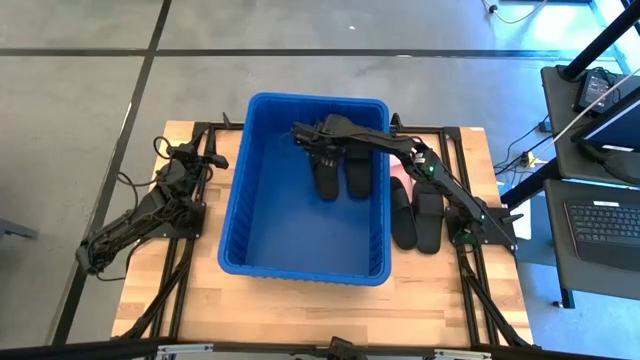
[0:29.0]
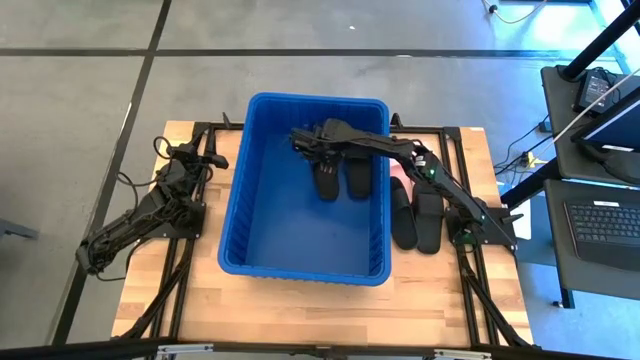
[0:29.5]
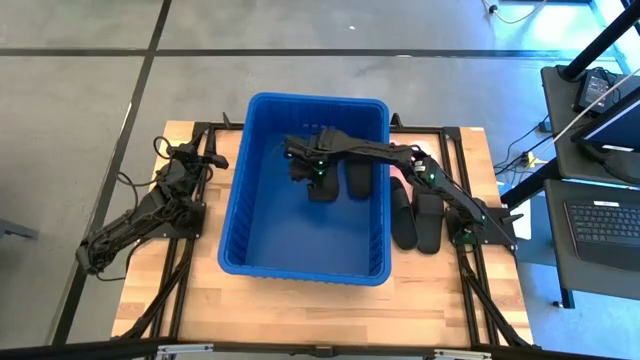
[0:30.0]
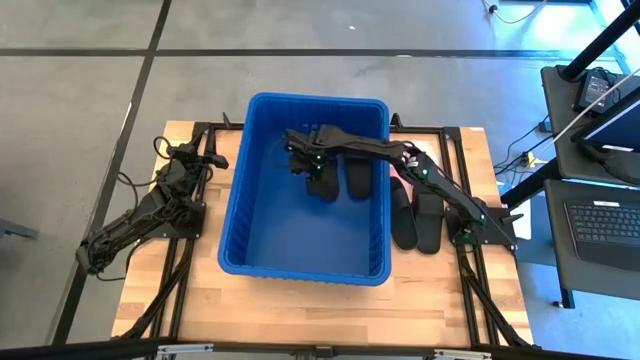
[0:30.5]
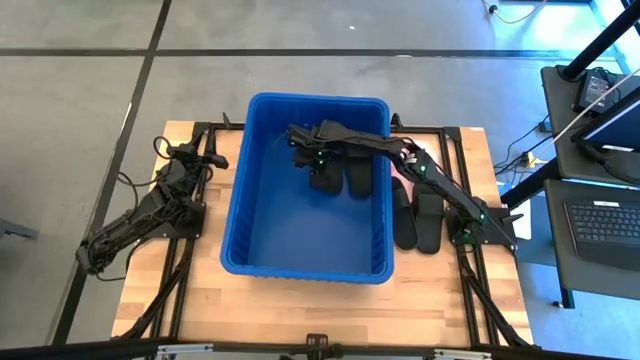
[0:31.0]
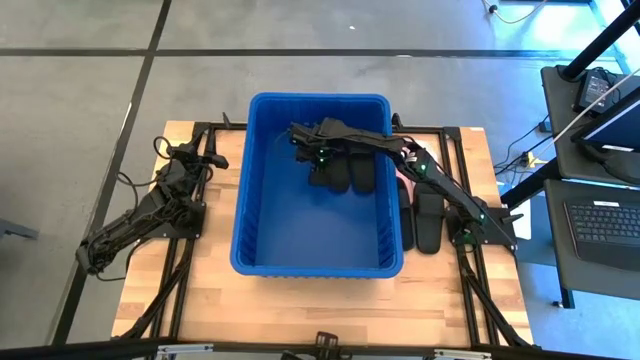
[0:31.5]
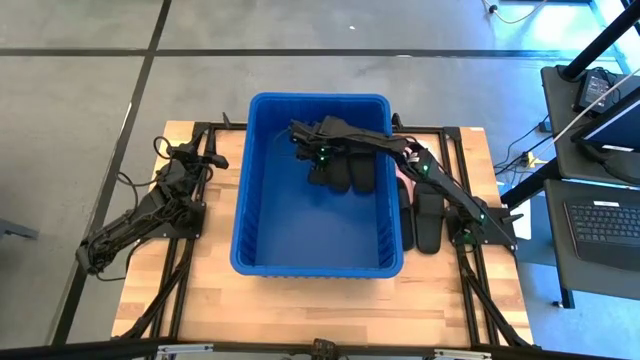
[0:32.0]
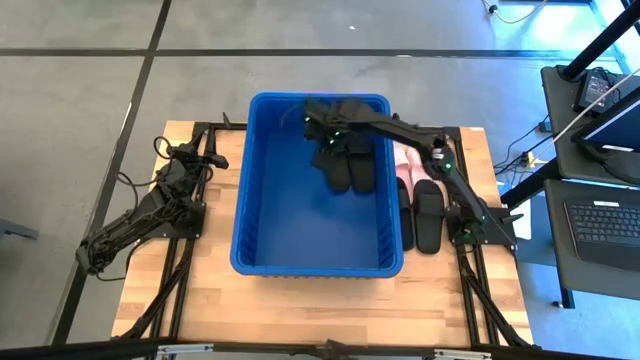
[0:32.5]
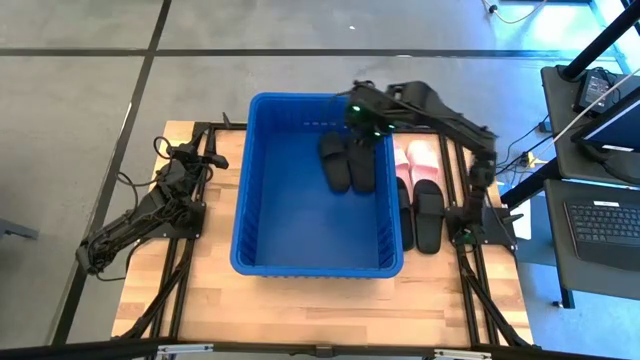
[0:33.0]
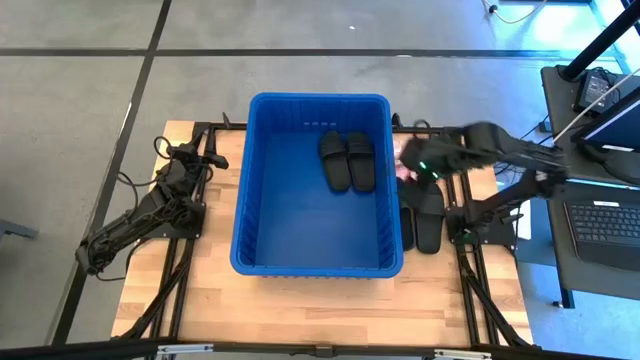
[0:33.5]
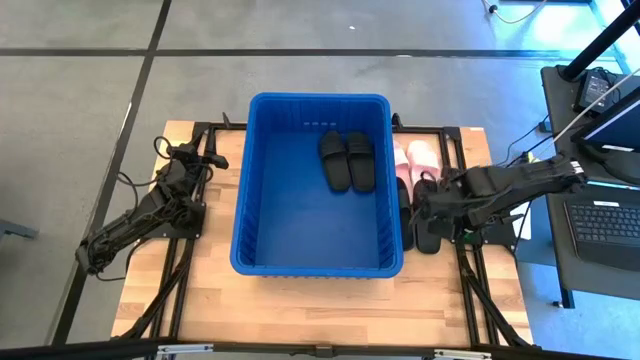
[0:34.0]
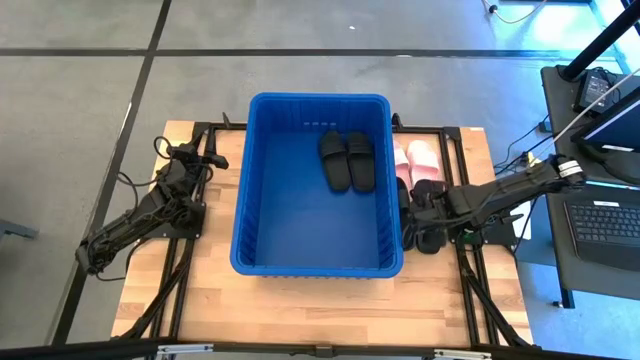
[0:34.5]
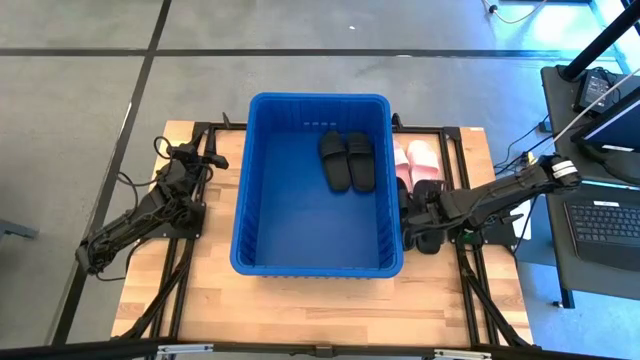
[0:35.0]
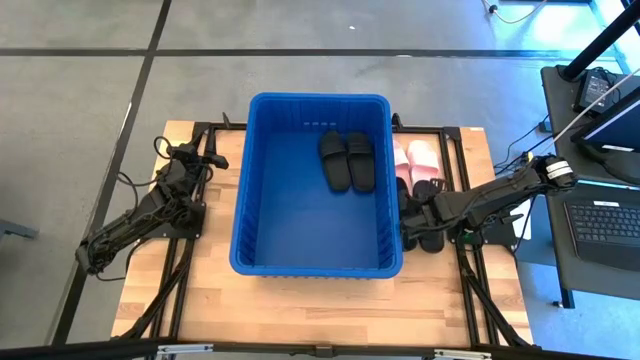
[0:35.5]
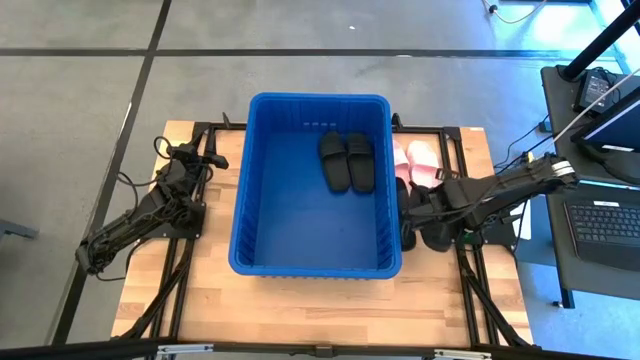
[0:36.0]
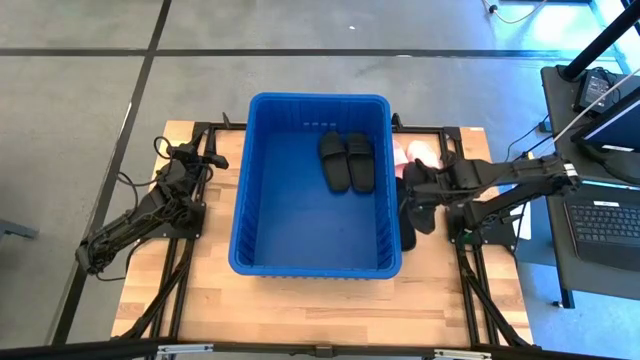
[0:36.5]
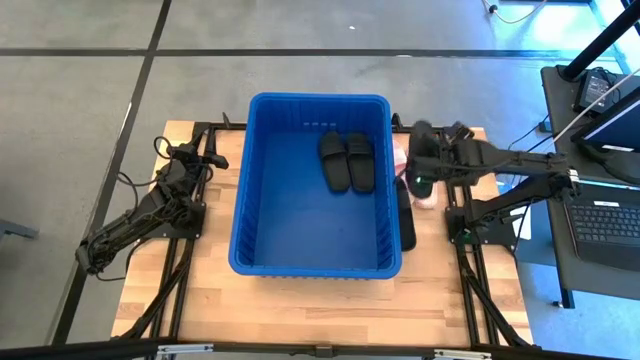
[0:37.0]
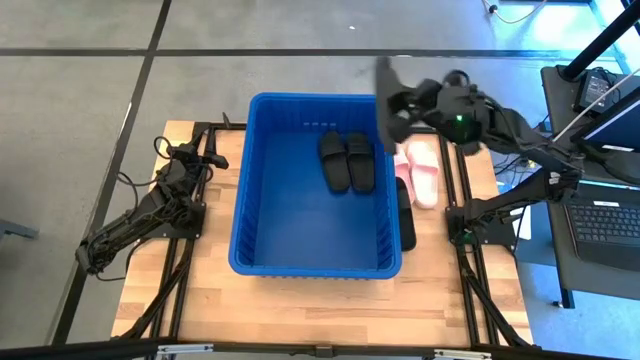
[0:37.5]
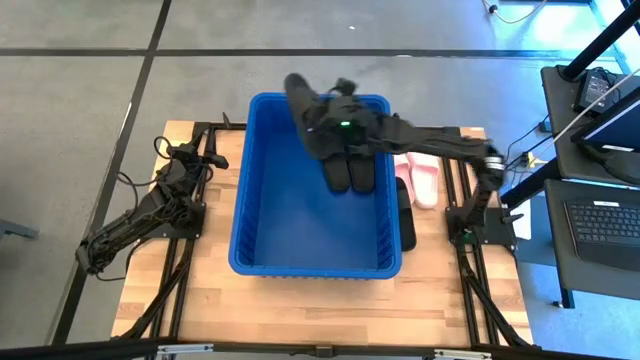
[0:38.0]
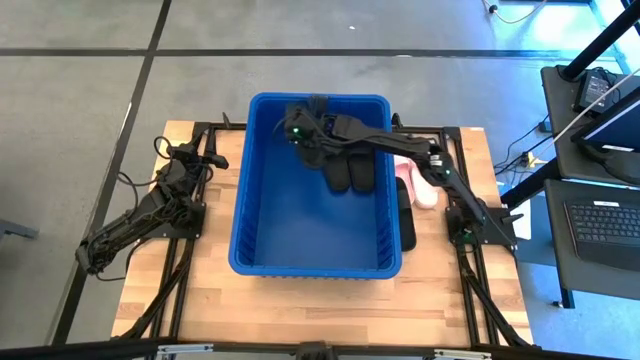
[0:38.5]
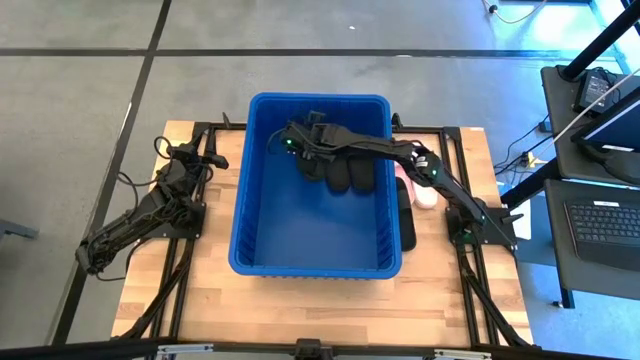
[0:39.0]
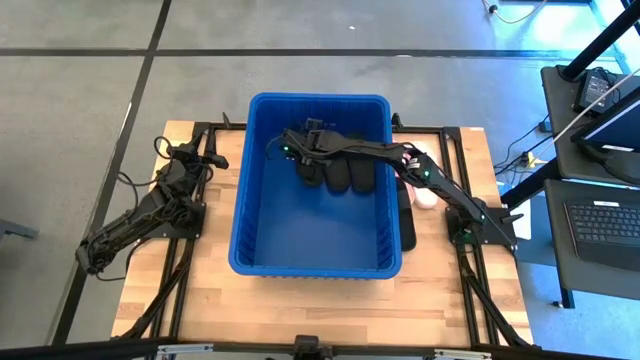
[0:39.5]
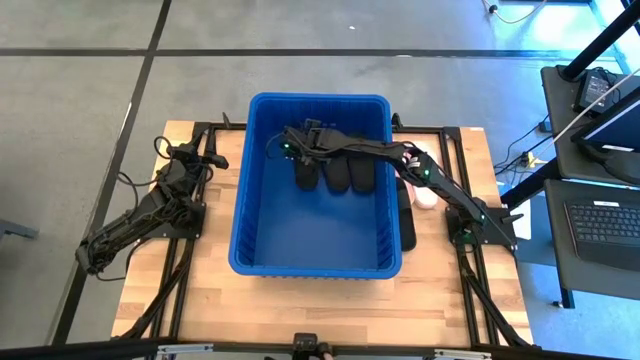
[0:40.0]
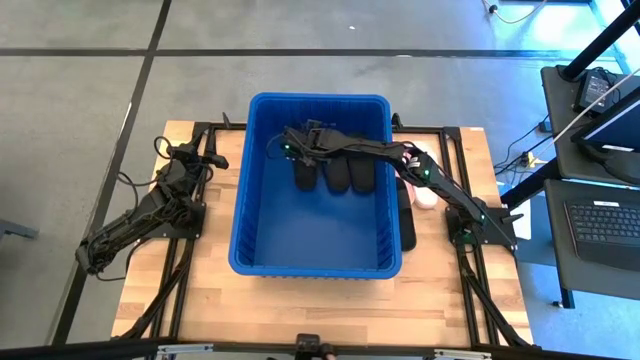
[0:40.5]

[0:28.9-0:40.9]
Task: Pick and place slides into bin
Put the black slipper into the blue bin

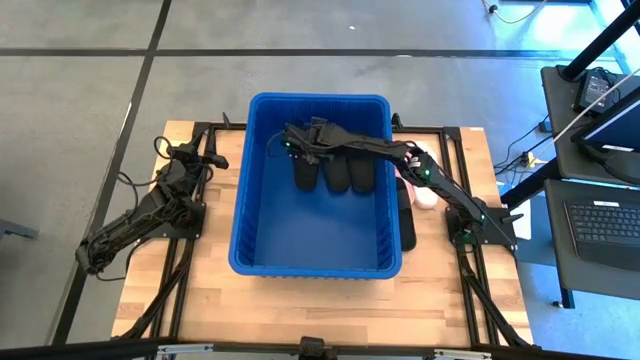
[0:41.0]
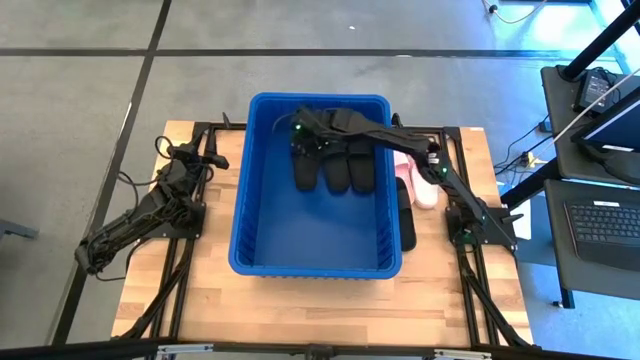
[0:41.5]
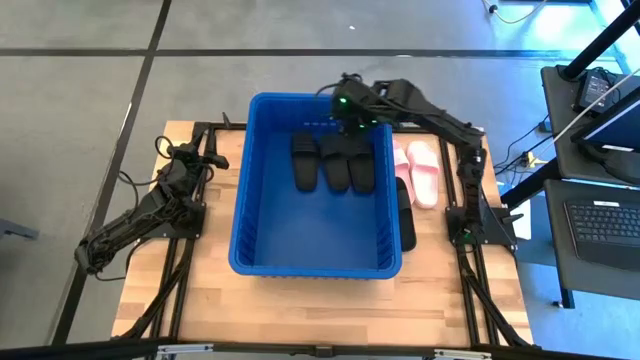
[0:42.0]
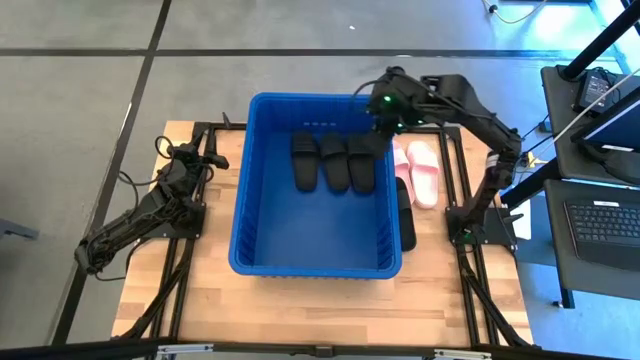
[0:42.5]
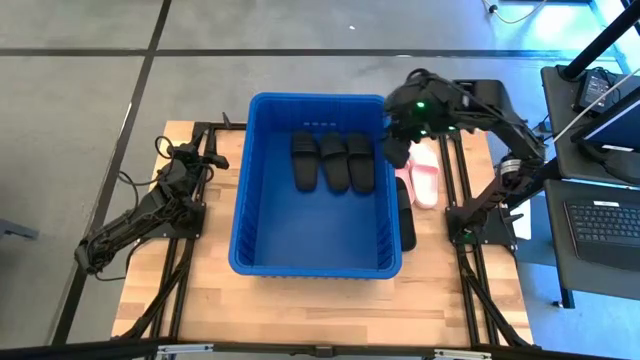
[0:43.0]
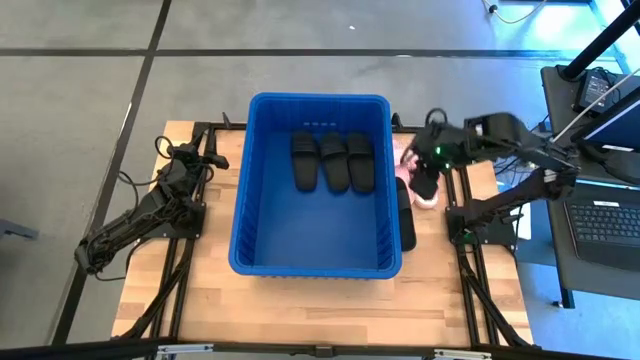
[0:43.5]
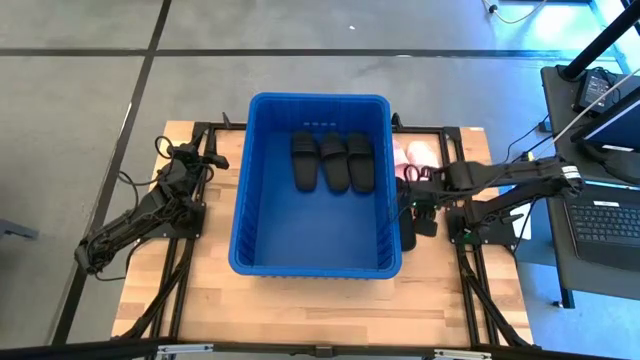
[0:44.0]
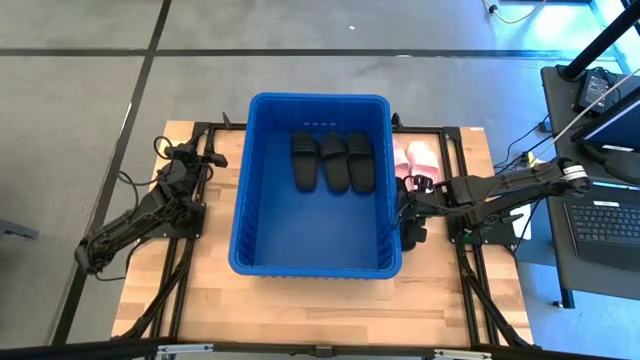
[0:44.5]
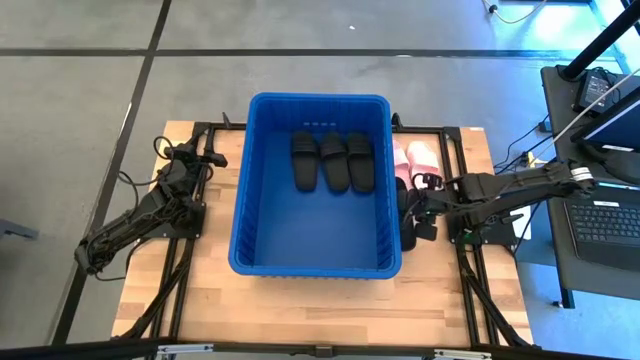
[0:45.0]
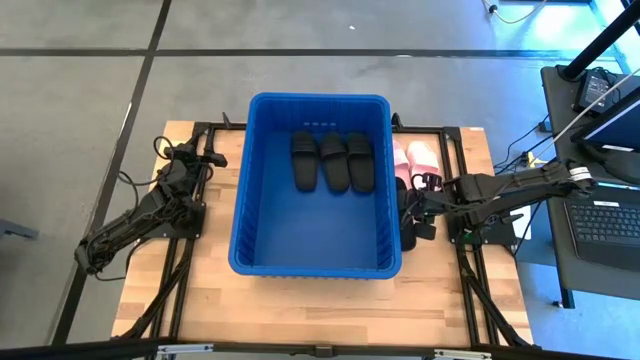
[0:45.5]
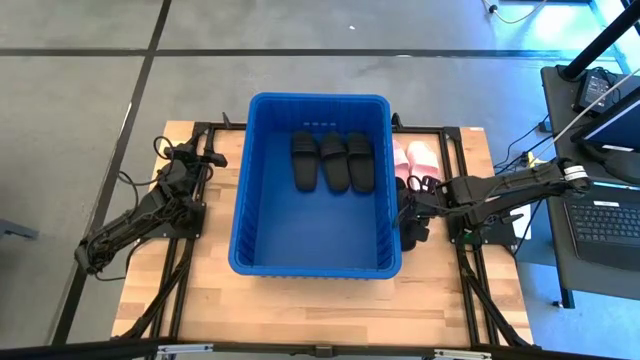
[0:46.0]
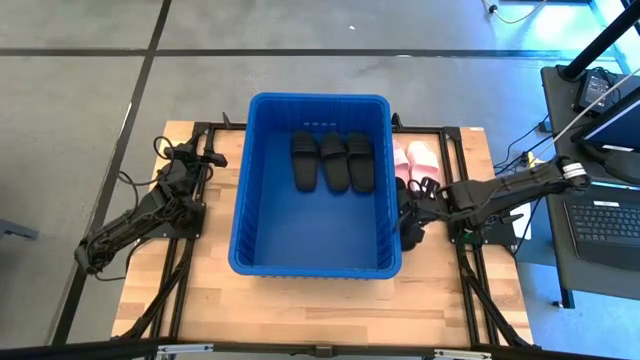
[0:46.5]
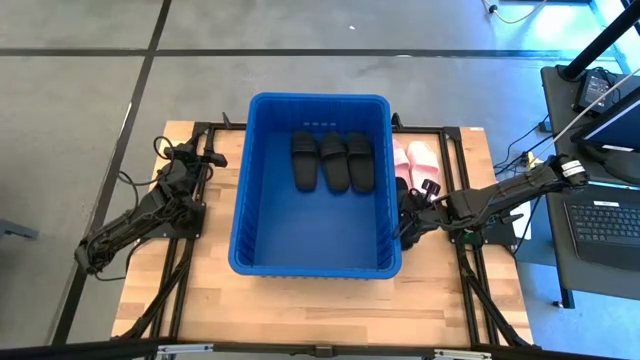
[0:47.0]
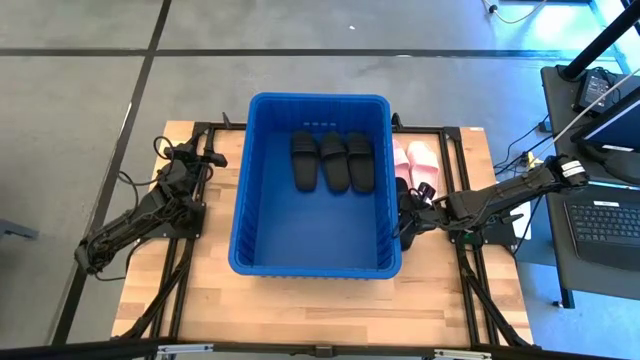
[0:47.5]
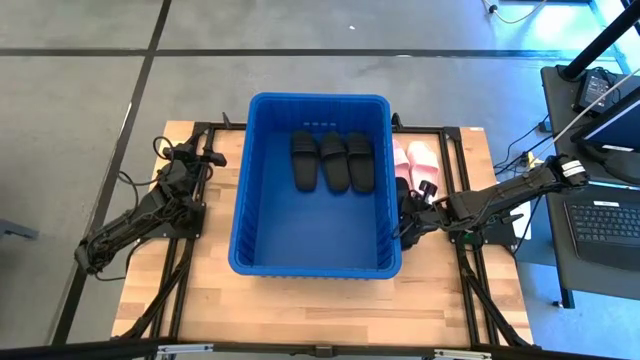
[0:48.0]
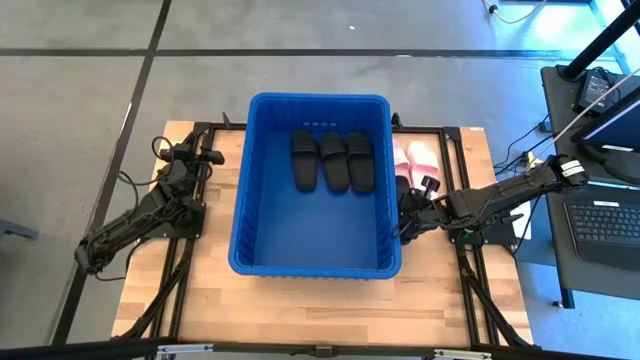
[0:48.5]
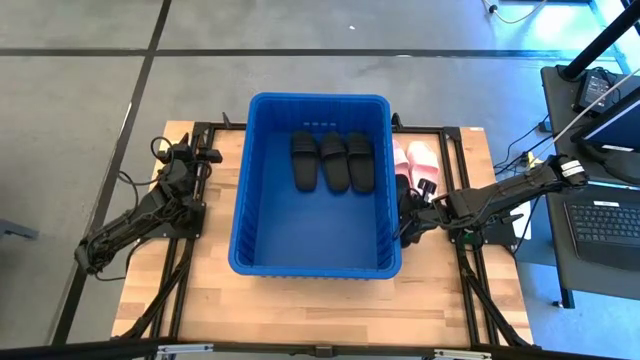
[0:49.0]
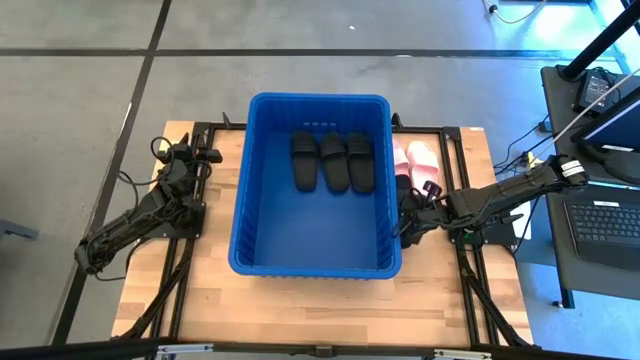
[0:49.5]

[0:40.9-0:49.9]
Put the black slipper into the blue bin
